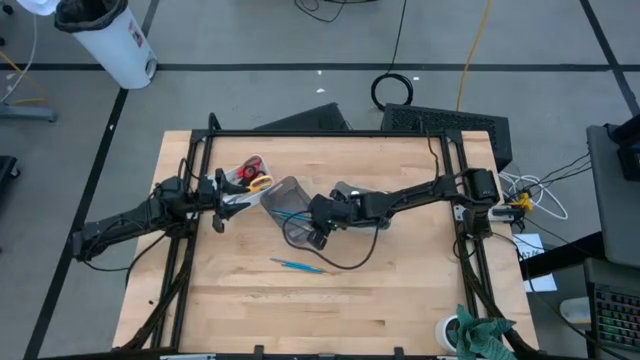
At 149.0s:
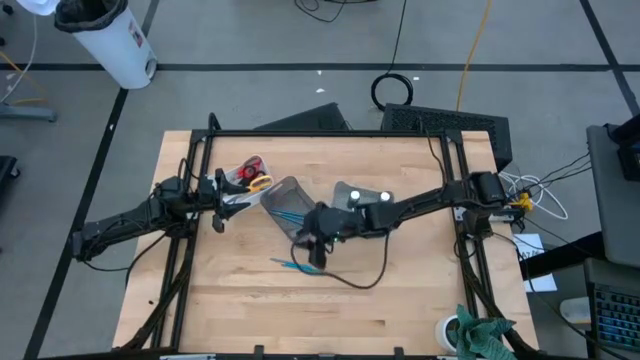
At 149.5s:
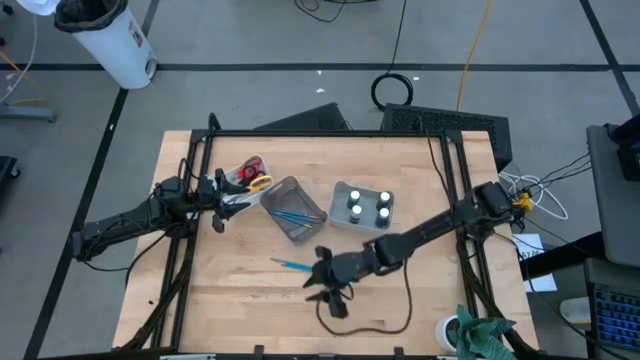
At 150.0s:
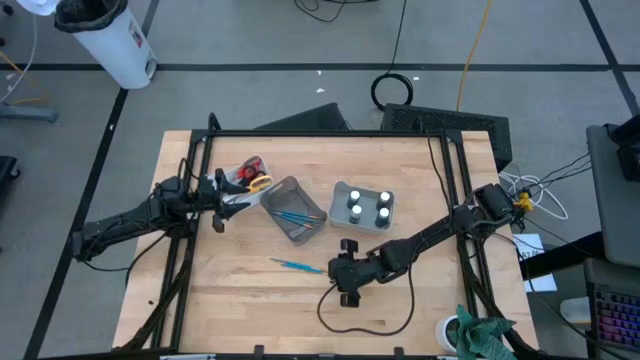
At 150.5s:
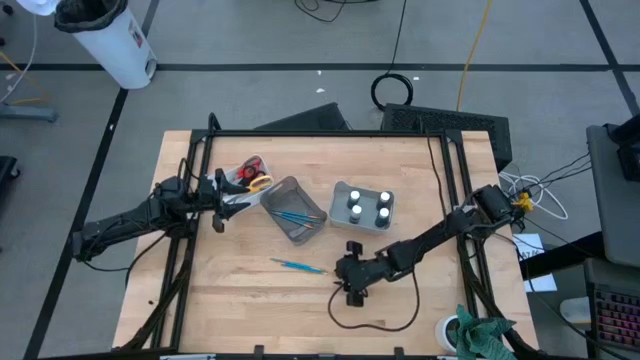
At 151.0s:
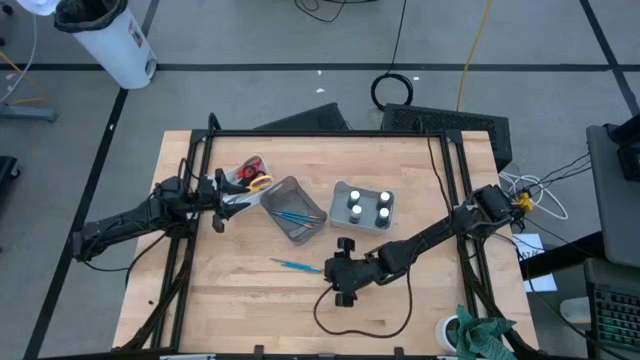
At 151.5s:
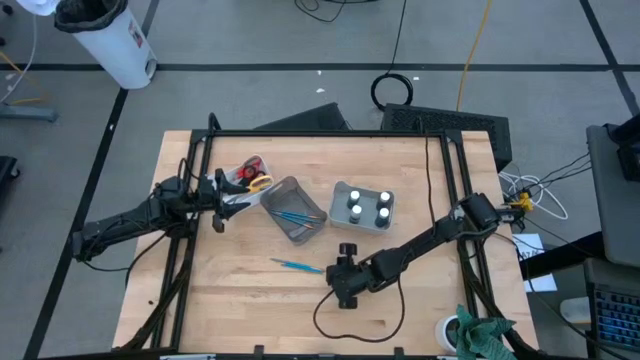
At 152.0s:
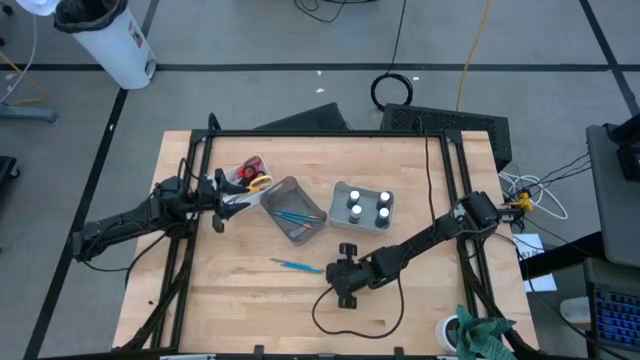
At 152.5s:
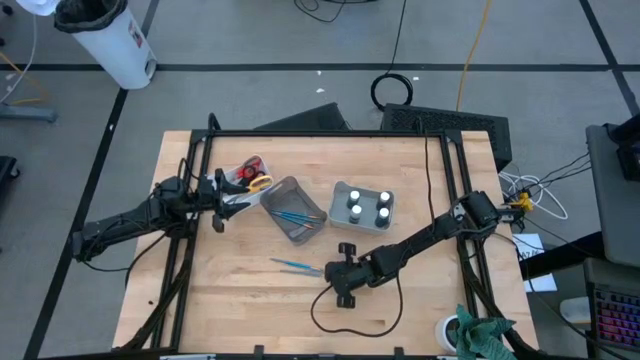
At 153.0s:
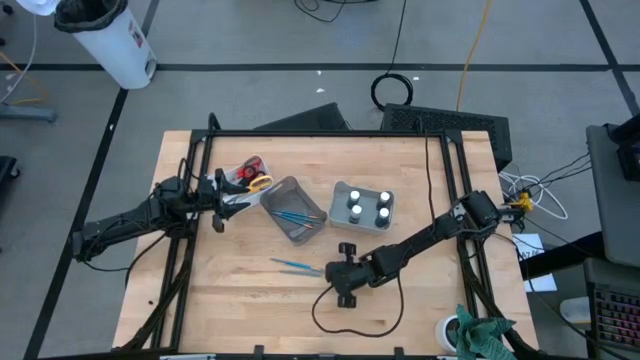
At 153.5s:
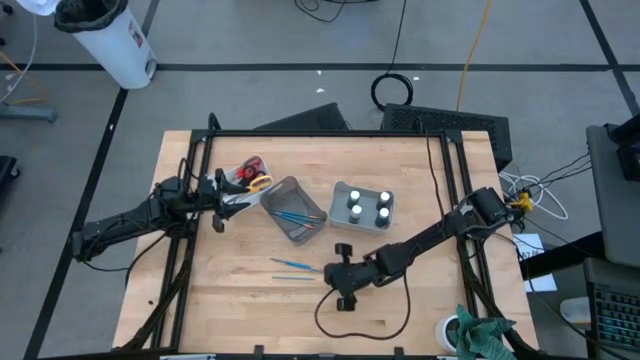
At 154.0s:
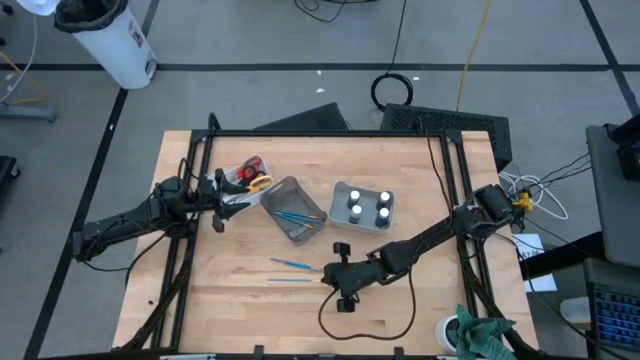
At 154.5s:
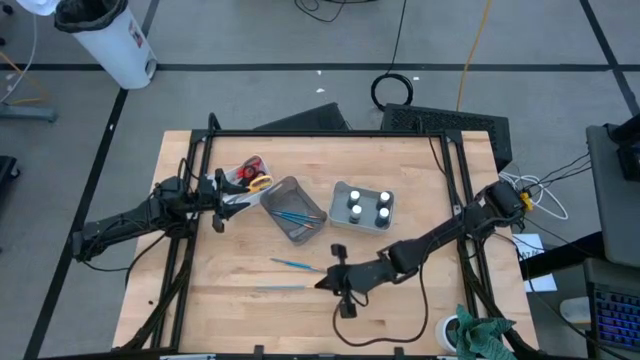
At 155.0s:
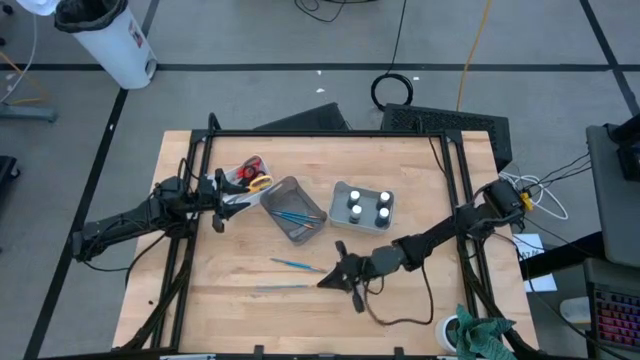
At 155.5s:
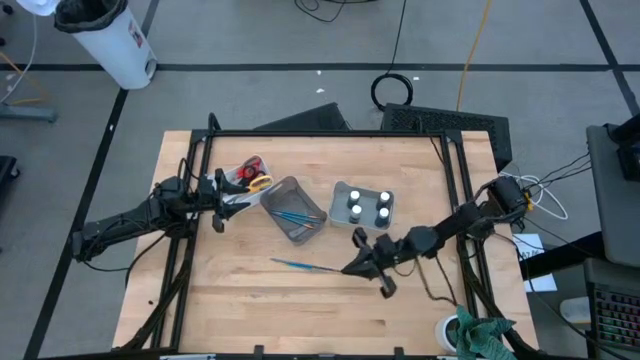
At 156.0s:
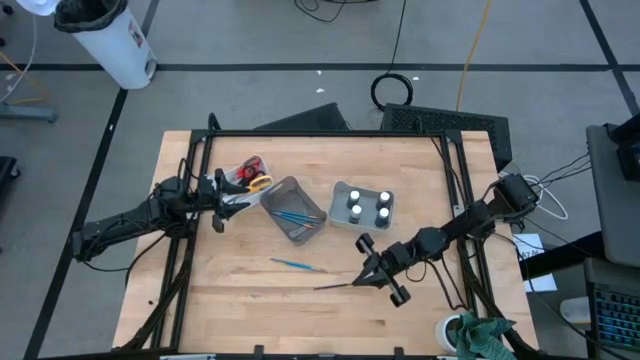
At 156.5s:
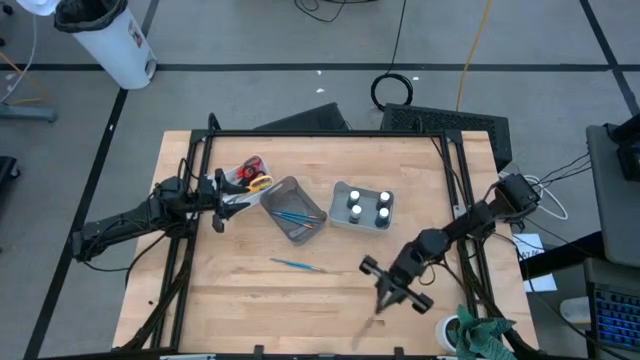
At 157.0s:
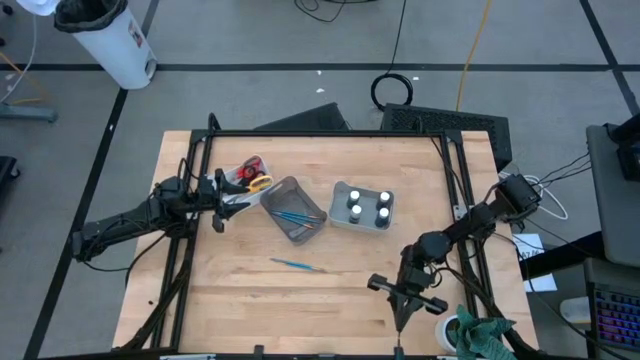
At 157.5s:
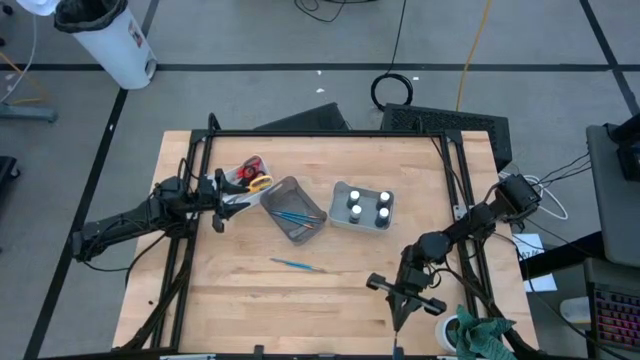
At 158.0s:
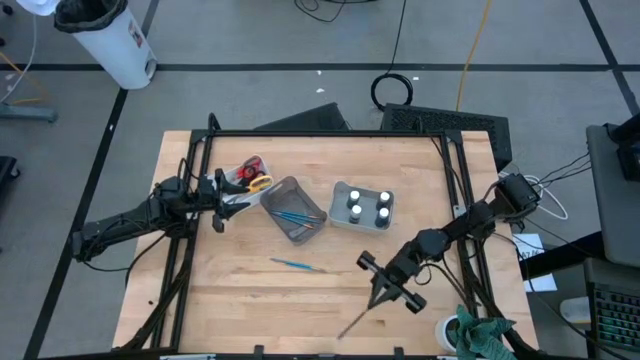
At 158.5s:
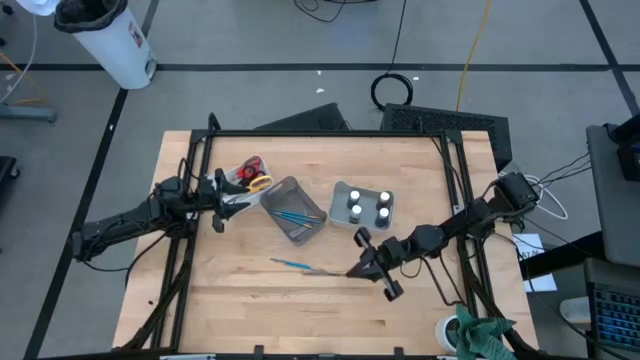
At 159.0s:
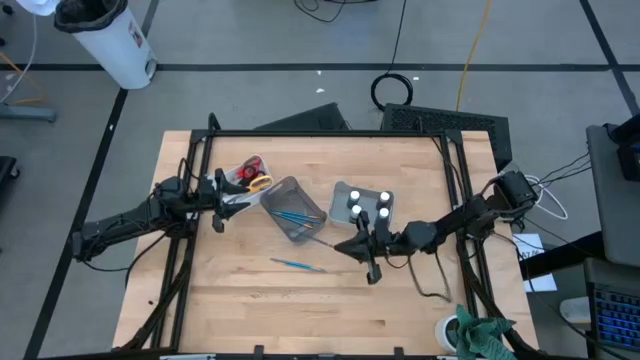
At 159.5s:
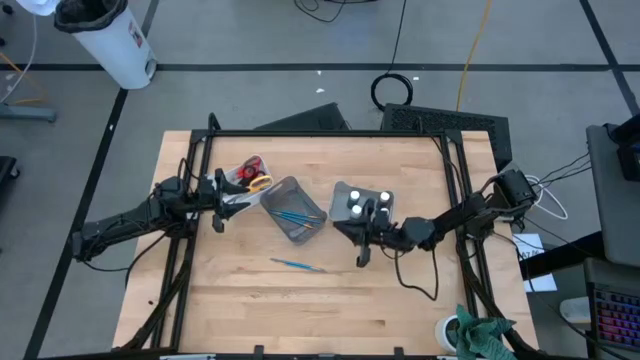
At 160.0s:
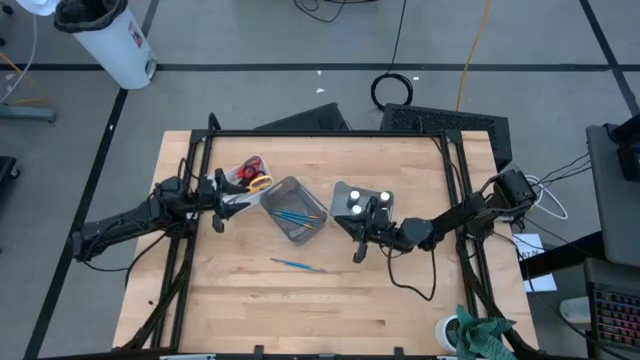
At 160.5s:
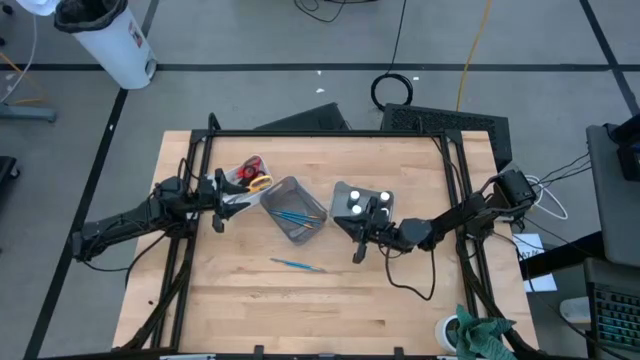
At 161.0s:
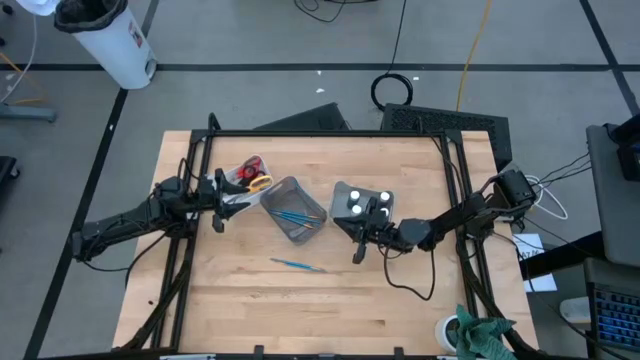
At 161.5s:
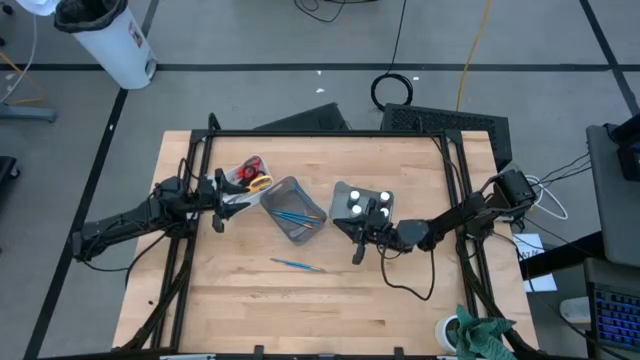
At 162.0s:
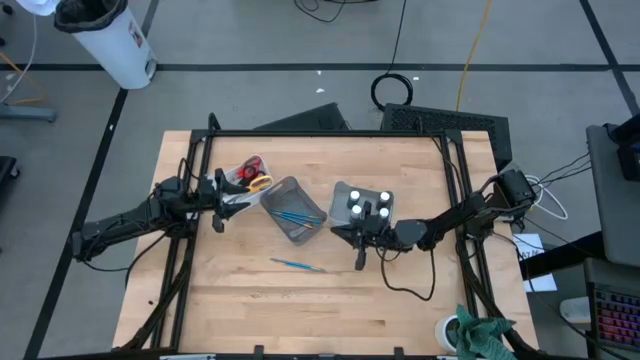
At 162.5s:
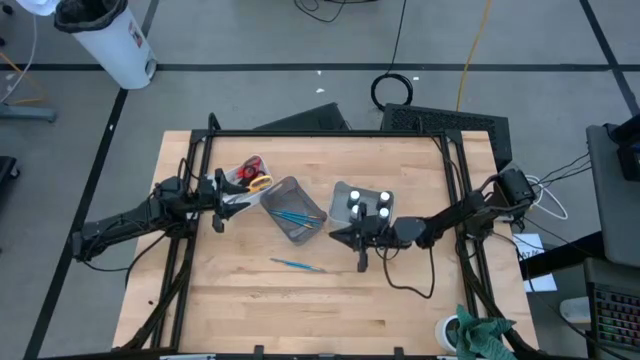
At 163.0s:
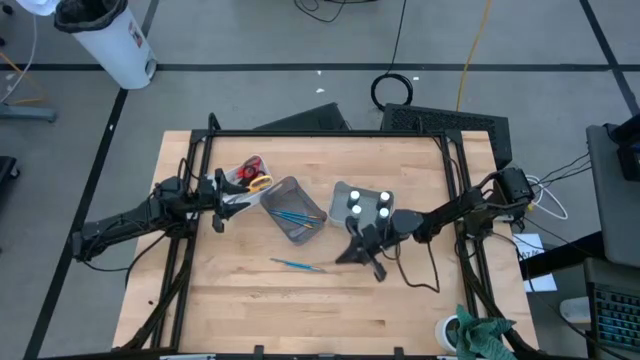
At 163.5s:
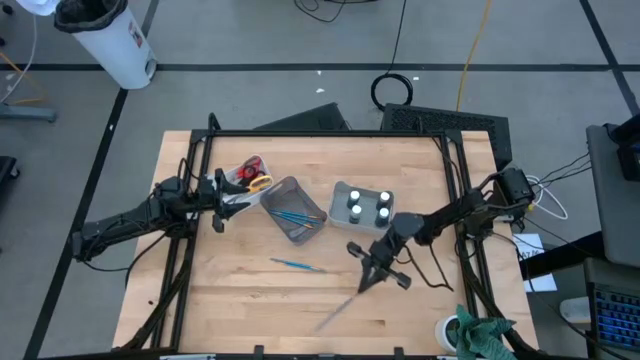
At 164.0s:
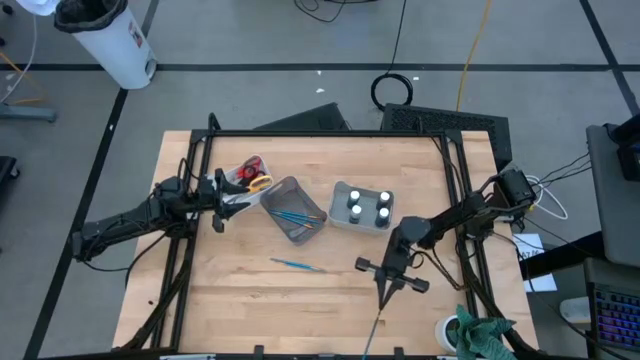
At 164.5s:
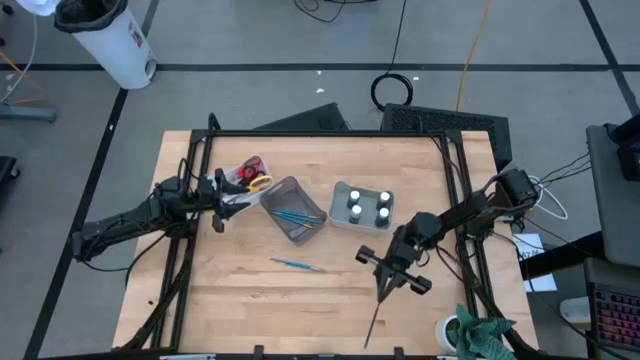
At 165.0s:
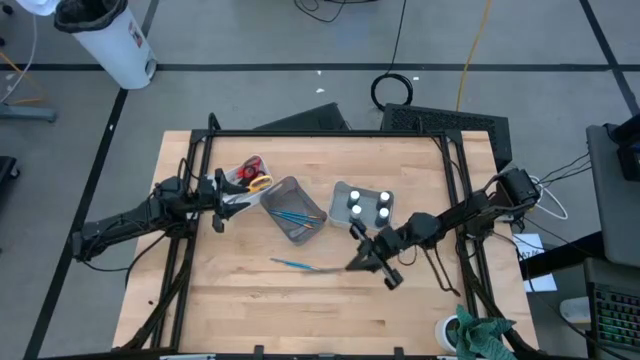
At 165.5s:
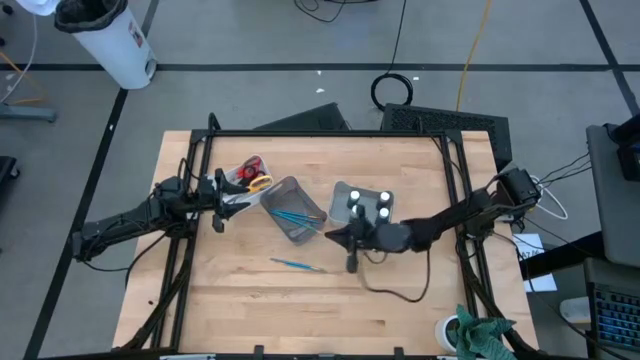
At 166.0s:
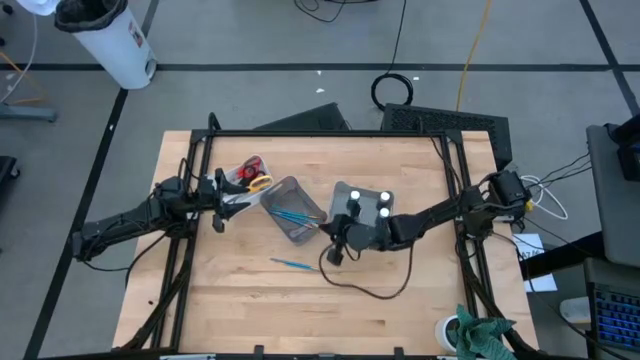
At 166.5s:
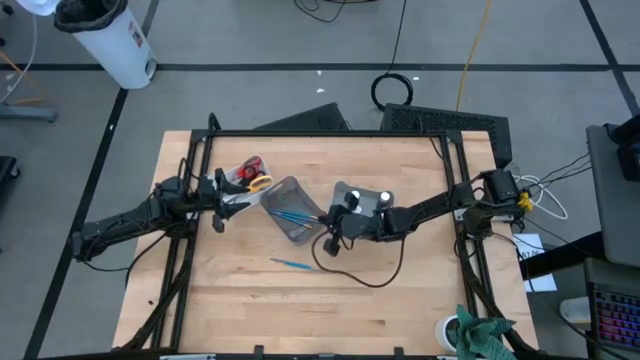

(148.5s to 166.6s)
Task: Pick & Place Paint Supplies
Put the blue paintbrush into the black bin

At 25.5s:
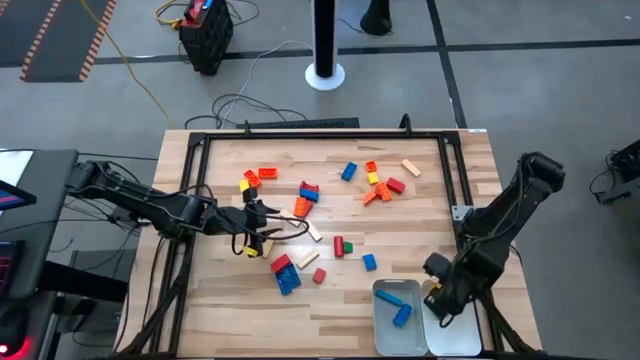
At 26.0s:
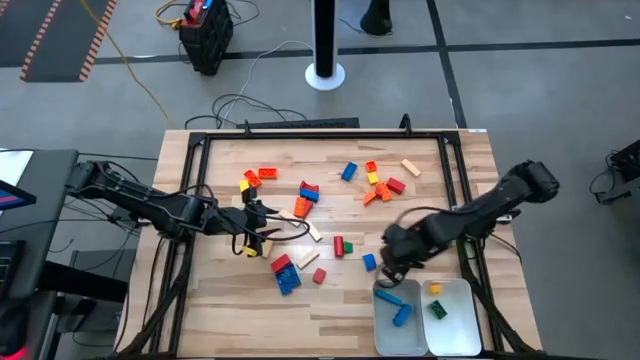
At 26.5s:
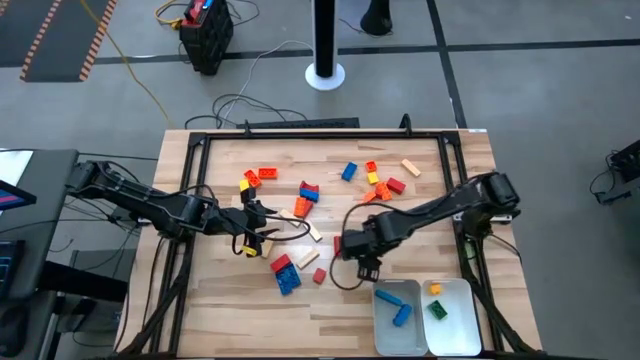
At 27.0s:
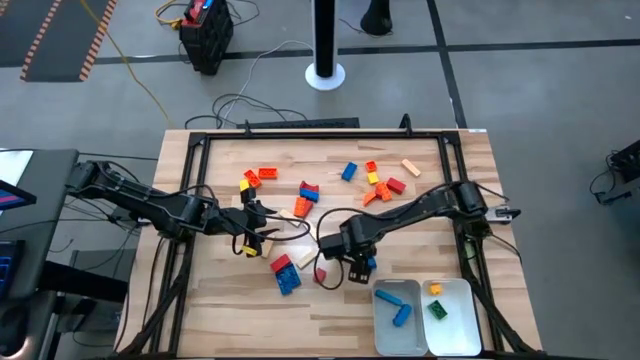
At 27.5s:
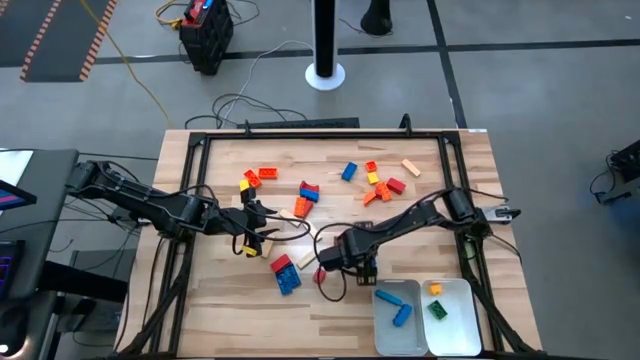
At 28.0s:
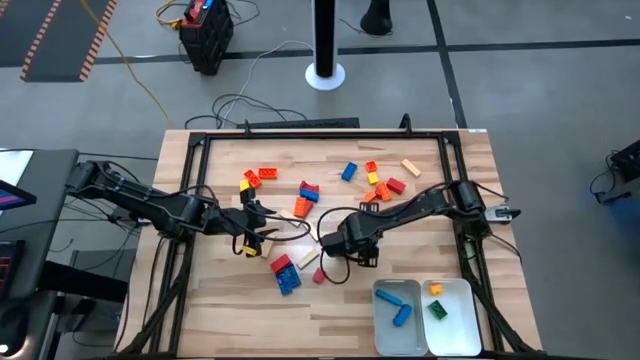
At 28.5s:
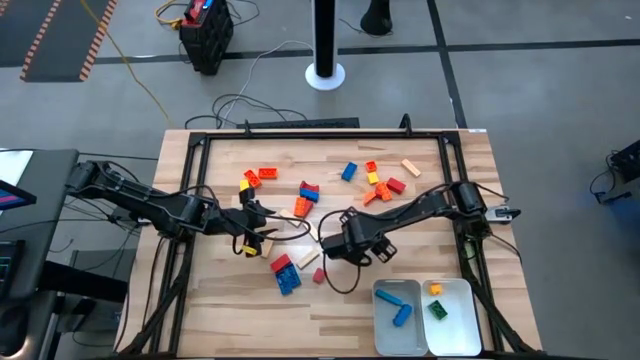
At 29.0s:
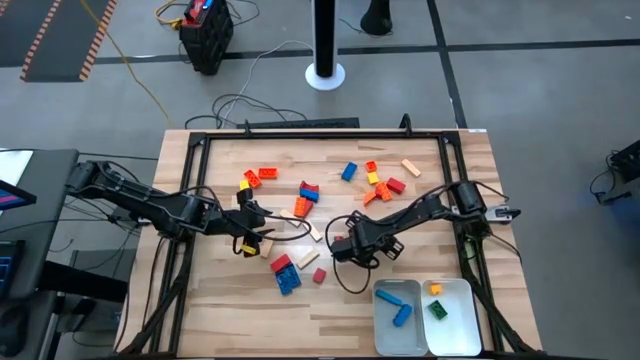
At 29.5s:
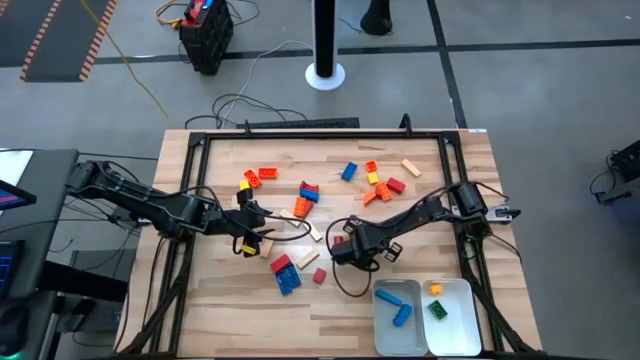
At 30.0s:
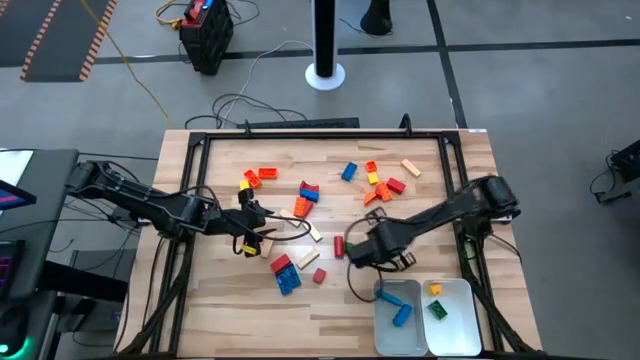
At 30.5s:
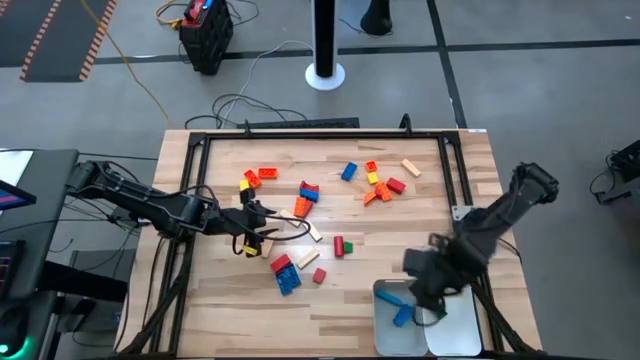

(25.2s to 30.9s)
Task: Sort blocks by size
Put the small blue game piece into the white bin
